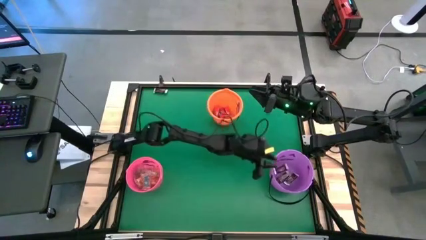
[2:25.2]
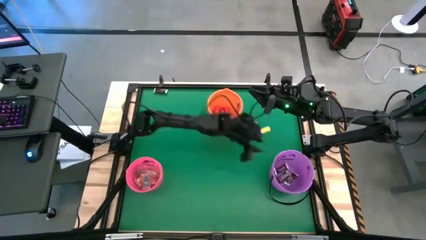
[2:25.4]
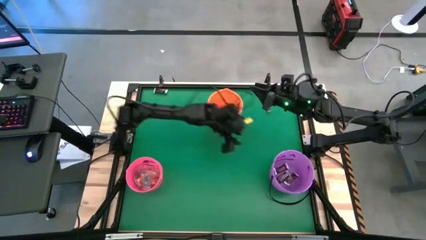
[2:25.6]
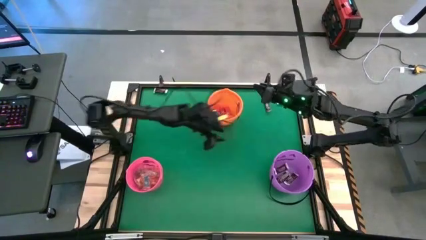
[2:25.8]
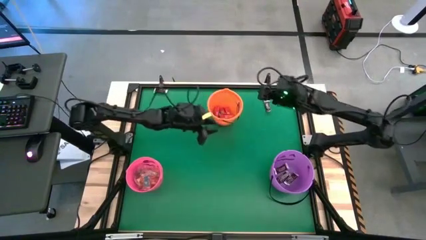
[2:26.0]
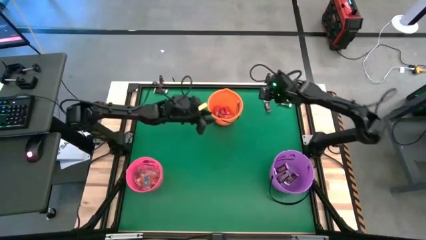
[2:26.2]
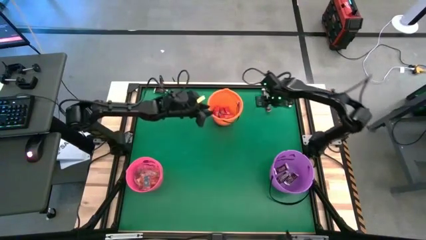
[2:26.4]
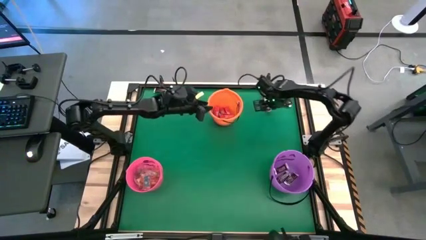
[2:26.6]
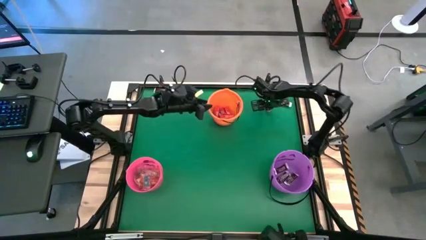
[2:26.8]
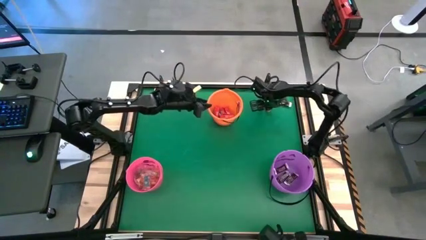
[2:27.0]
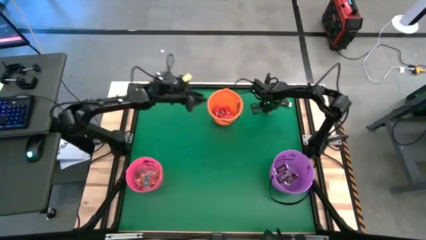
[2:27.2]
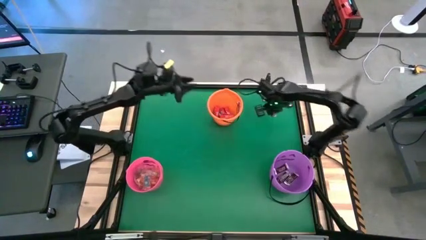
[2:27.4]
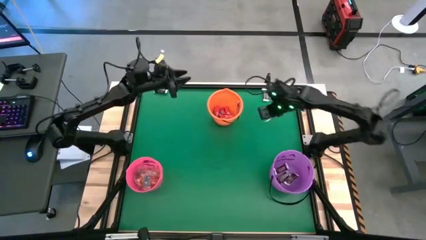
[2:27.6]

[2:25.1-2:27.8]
Task: Sort candy by brand, put in halloween buckets
Put the brown chocolate into the violet bucket

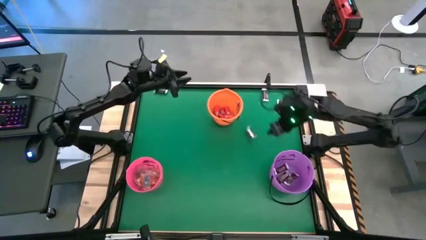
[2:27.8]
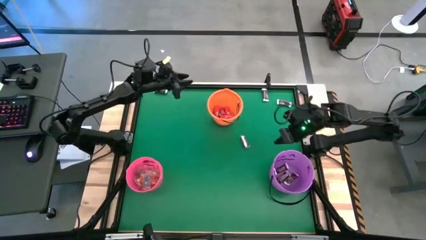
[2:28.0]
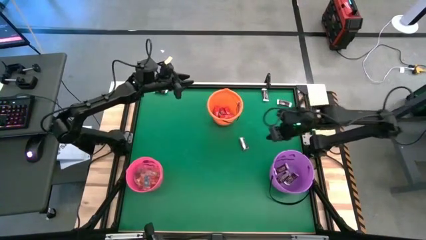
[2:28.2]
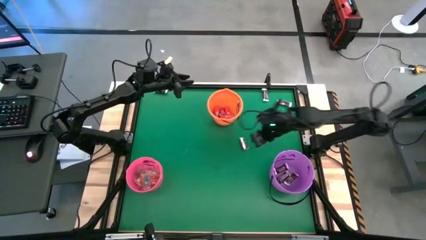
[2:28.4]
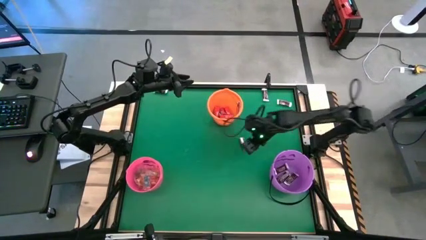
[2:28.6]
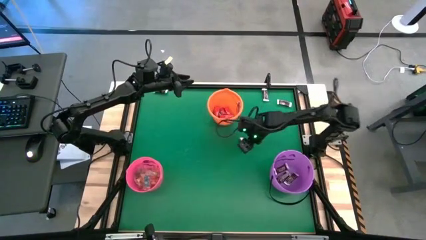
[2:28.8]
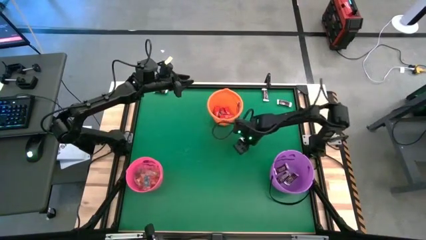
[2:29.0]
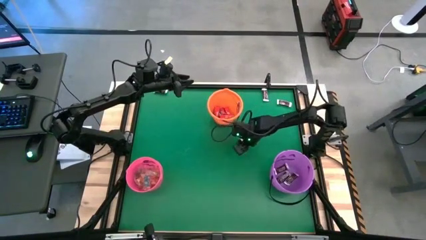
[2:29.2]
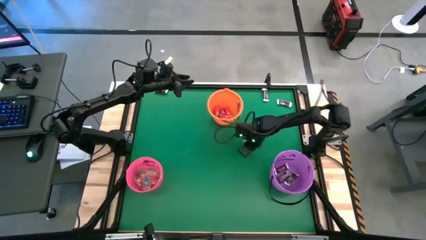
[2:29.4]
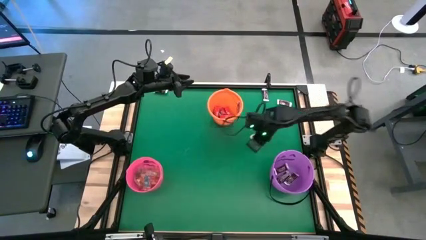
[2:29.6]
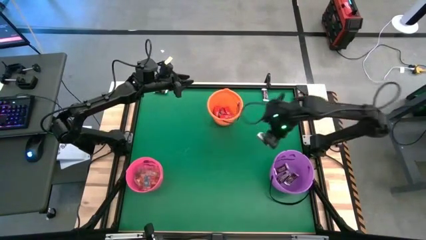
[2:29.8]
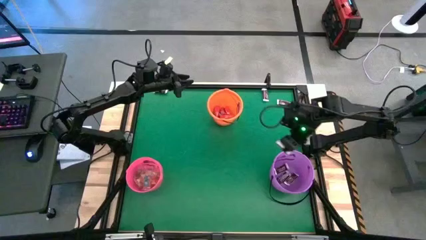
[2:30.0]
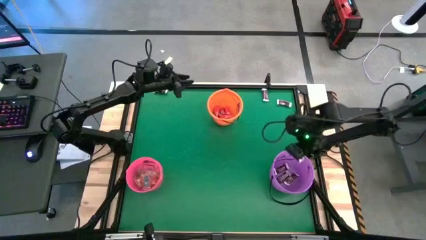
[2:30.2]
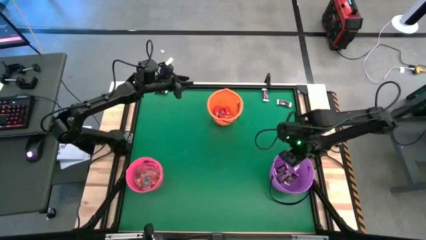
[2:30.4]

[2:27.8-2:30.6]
Put the brown chocolate into the violet bucket

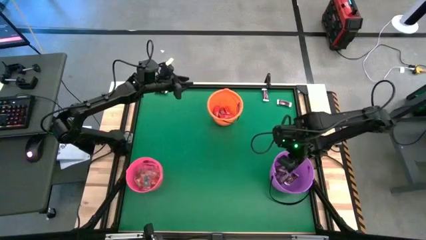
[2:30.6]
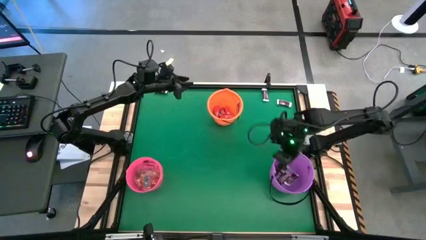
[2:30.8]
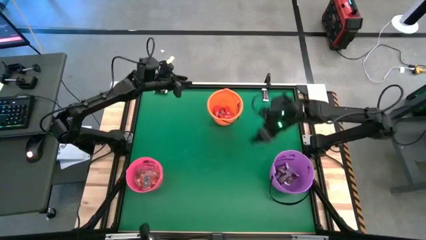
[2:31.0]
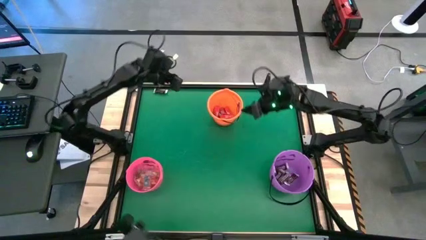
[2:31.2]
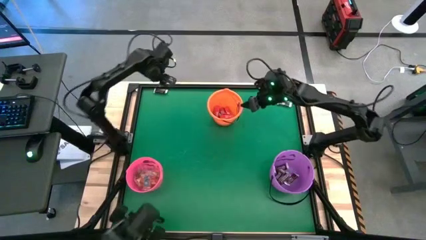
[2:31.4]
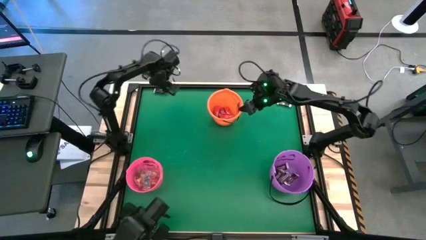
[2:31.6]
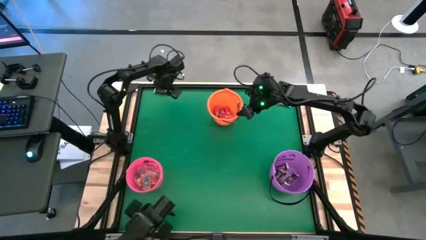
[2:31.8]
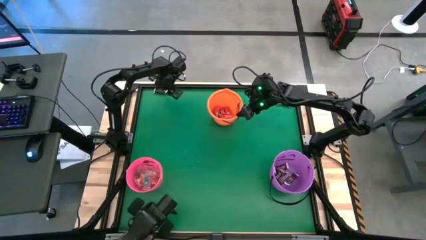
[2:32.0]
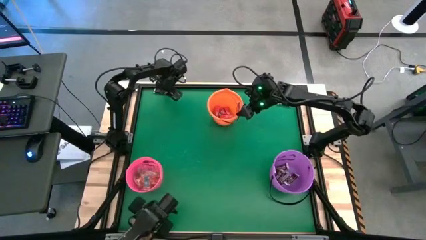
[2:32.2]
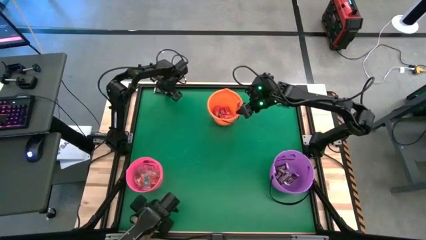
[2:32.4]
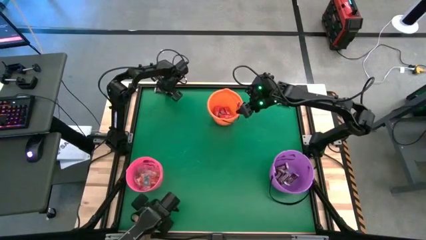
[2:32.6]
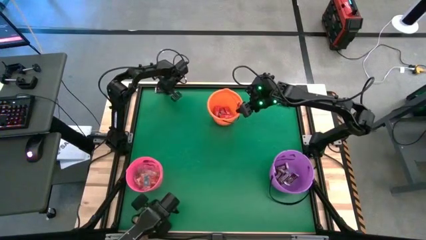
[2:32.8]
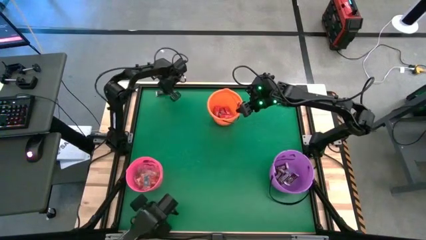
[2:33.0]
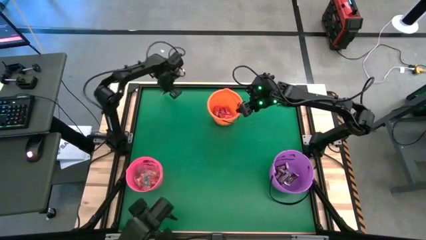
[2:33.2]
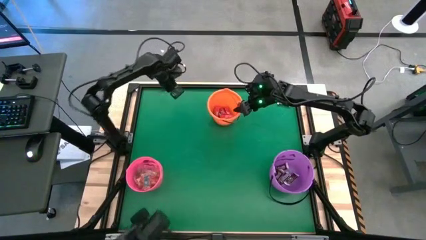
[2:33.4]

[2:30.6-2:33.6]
Put the brown chocolate into the violet bucket

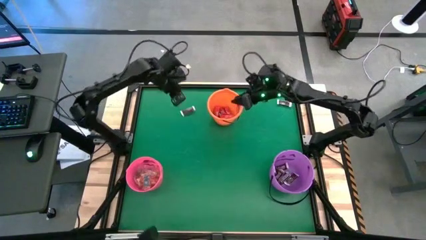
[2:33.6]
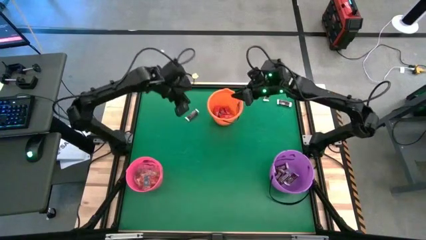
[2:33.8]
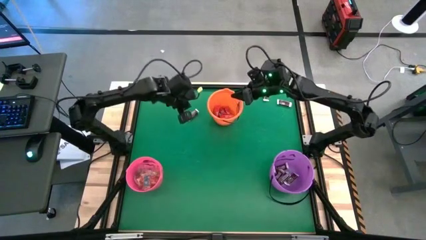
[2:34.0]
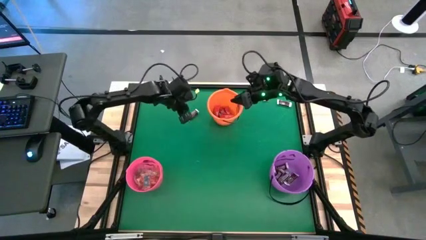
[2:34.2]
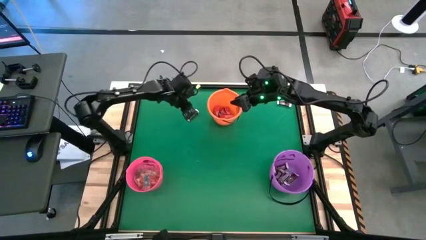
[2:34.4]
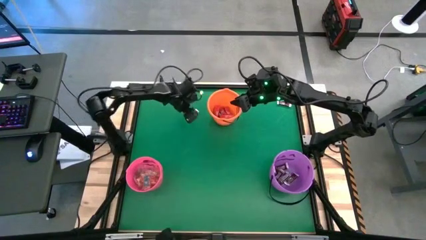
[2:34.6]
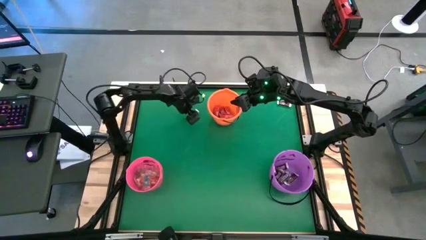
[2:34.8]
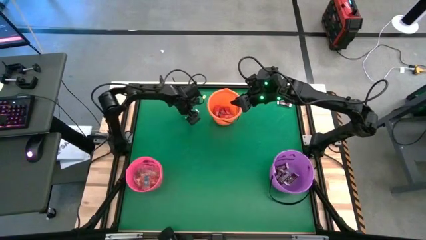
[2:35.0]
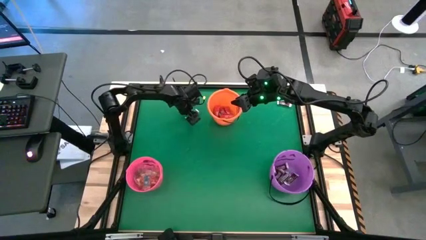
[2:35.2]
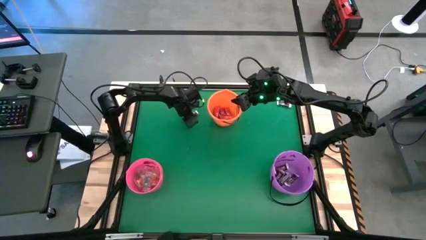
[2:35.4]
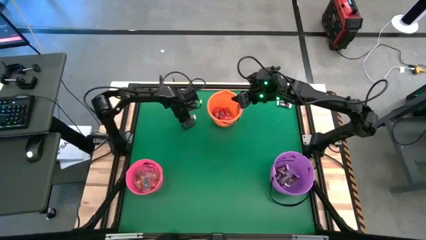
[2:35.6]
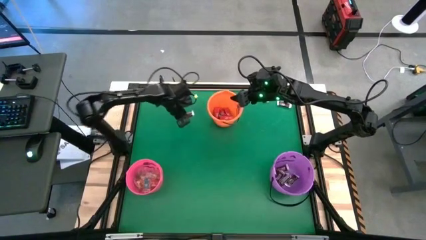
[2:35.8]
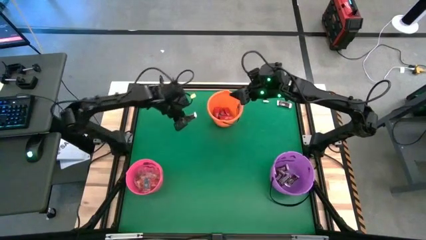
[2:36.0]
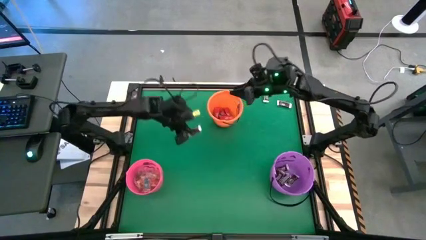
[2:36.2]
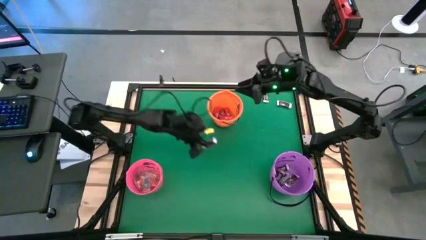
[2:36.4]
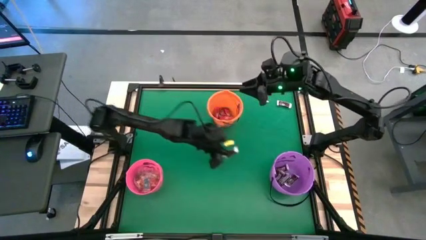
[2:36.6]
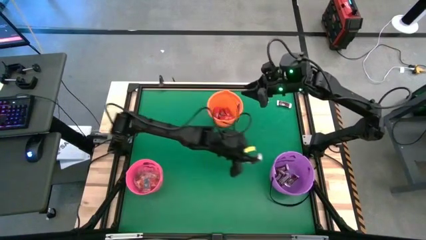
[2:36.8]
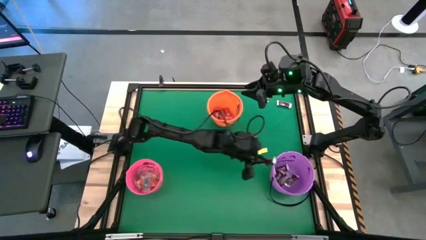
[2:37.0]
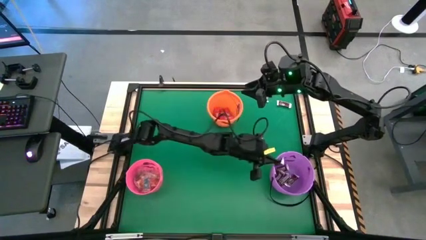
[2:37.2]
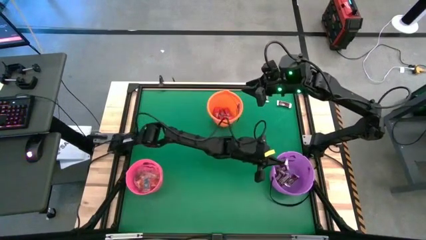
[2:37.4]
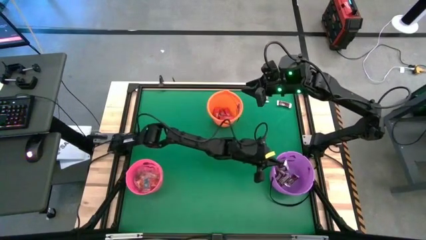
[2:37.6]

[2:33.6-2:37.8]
Put the brown chocolate into the violet bucket

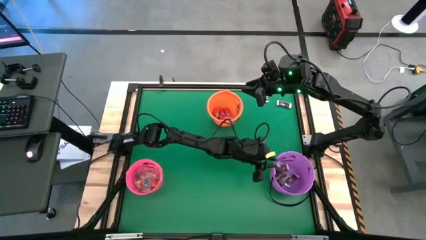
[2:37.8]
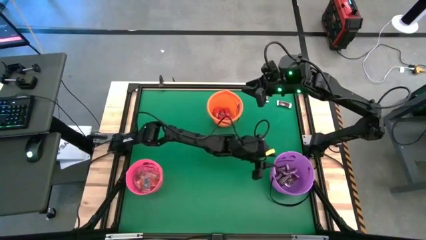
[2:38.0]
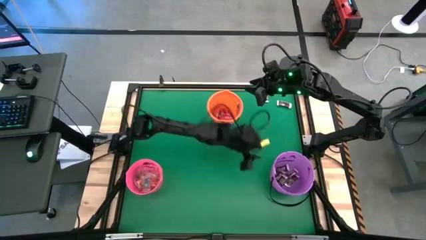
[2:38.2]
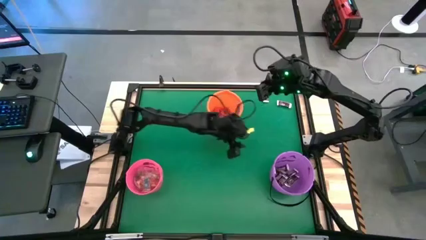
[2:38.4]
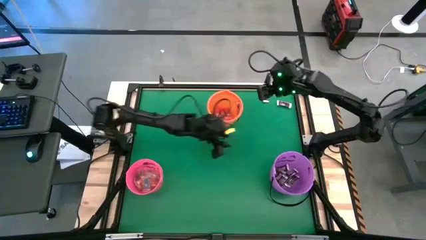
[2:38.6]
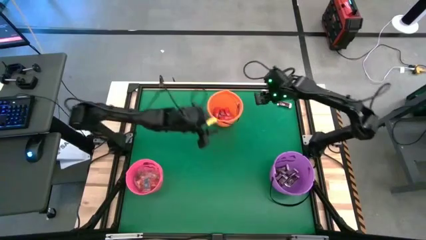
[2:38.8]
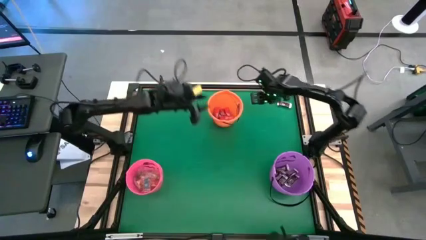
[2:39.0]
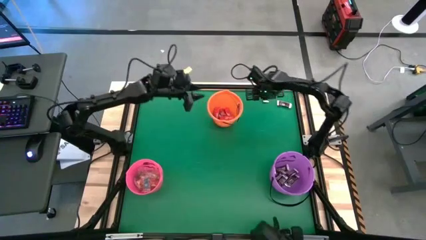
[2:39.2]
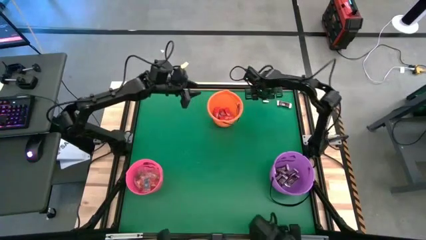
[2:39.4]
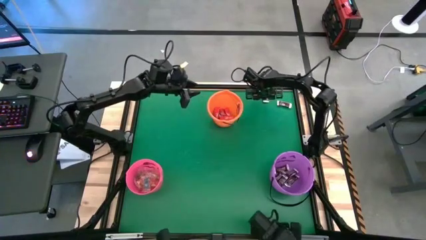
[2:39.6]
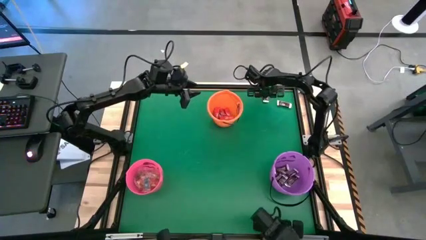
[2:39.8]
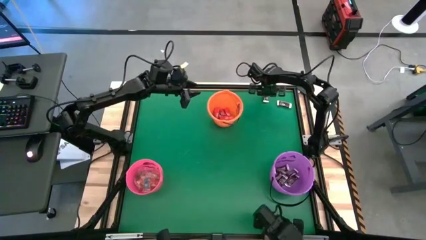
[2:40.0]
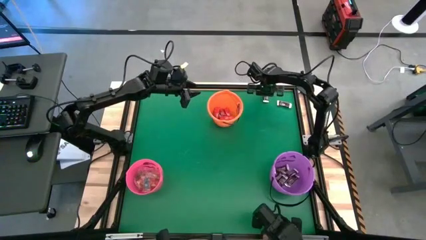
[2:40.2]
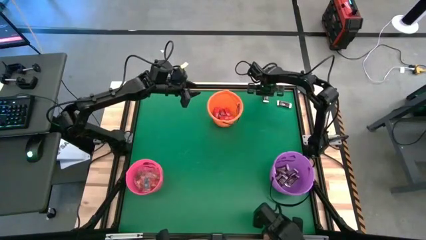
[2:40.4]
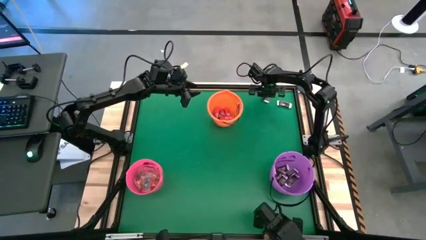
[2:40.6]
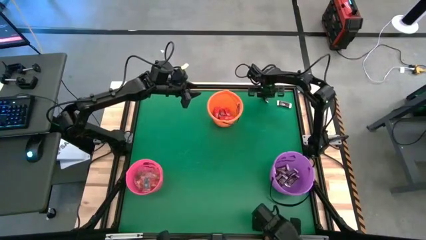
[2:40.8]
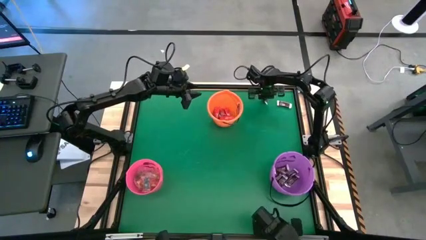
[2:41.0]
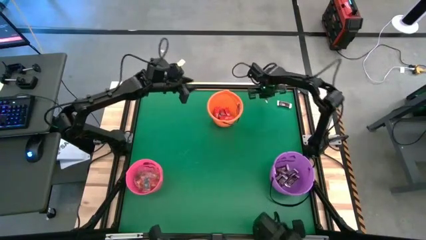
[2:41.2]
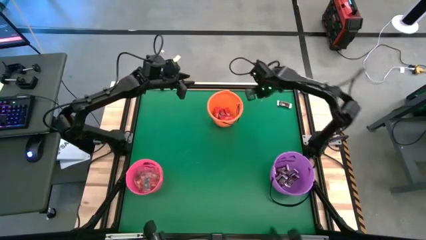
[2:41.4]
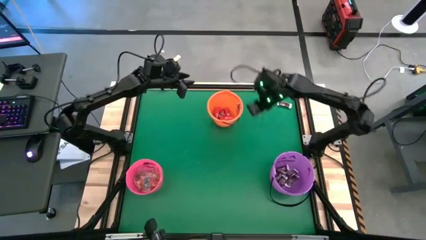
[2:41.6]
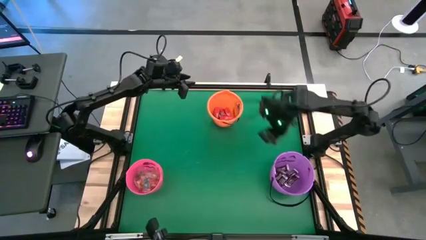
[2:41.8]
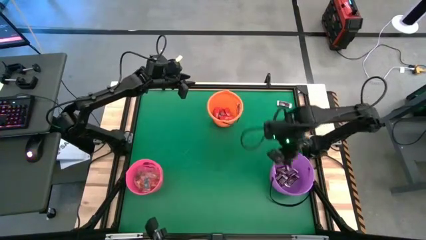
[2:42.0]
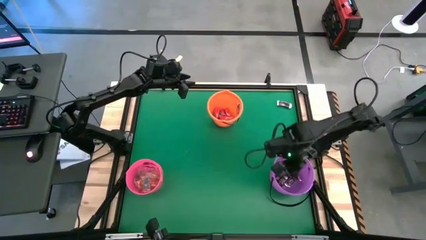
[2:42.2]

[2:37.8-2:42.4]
Put the brown chocolate into the violet bucket
